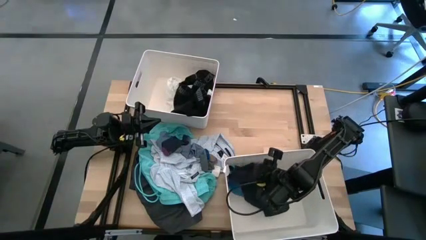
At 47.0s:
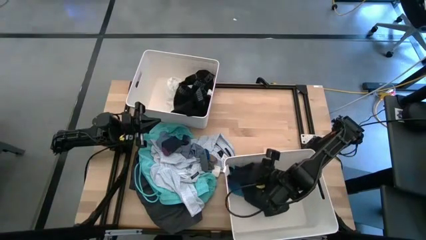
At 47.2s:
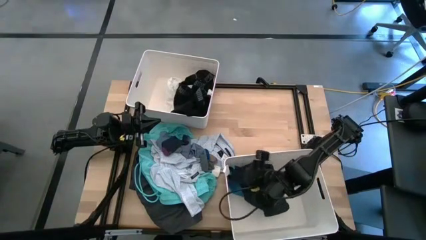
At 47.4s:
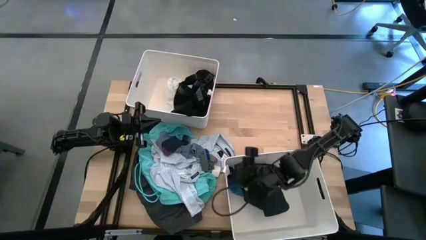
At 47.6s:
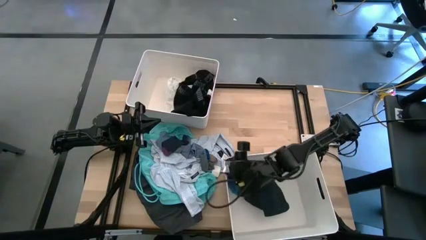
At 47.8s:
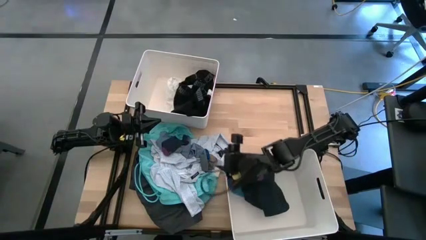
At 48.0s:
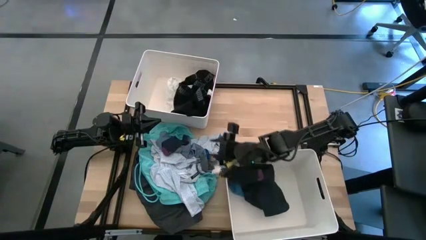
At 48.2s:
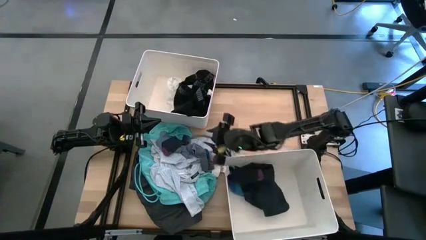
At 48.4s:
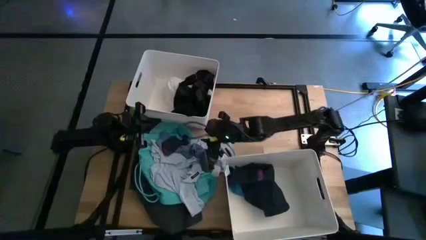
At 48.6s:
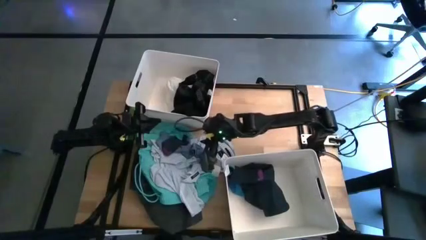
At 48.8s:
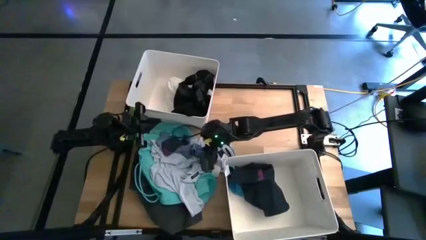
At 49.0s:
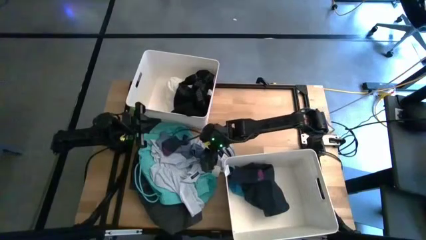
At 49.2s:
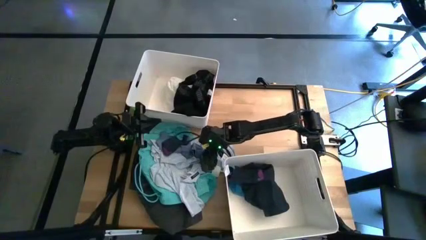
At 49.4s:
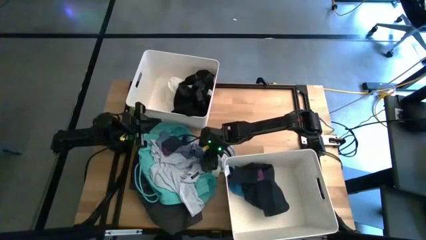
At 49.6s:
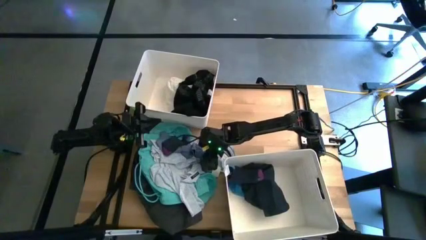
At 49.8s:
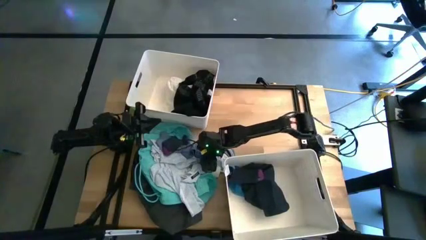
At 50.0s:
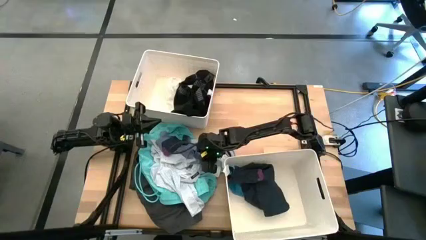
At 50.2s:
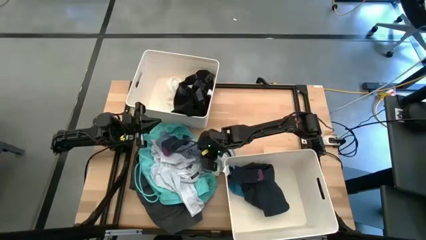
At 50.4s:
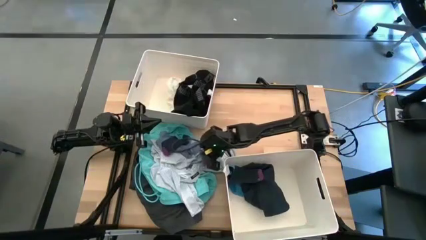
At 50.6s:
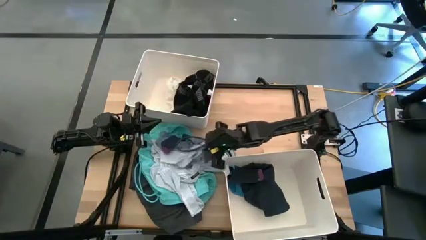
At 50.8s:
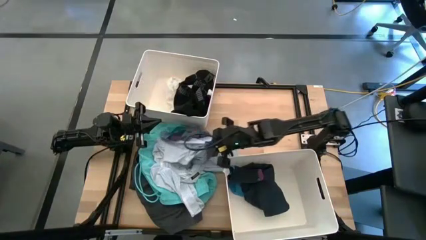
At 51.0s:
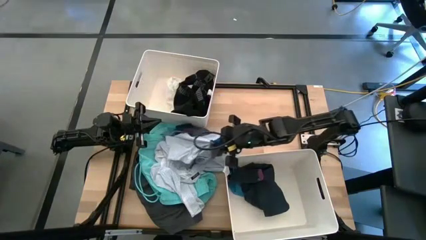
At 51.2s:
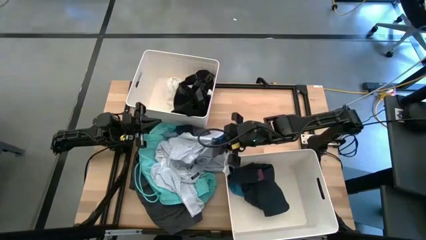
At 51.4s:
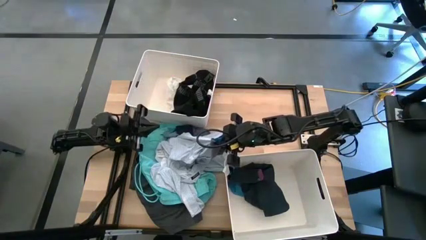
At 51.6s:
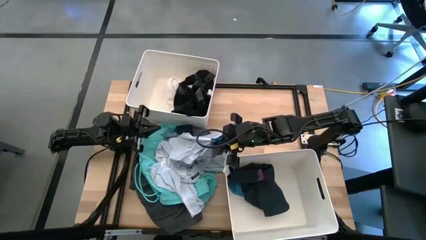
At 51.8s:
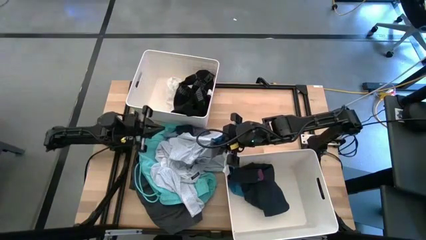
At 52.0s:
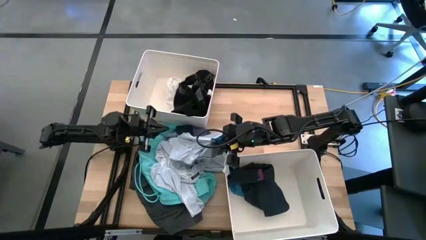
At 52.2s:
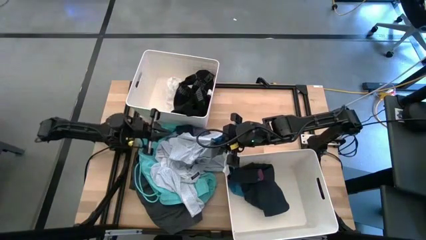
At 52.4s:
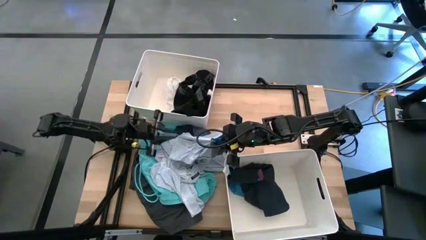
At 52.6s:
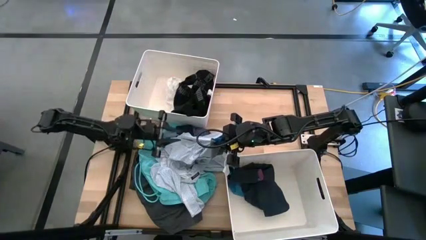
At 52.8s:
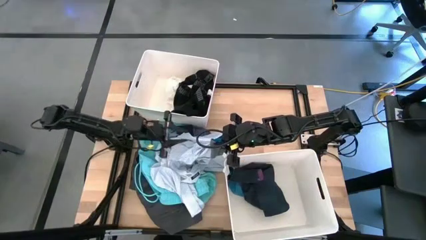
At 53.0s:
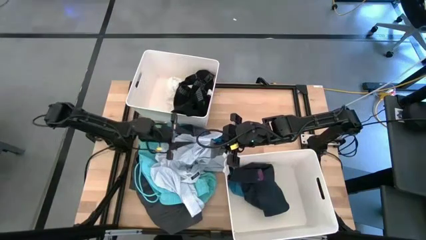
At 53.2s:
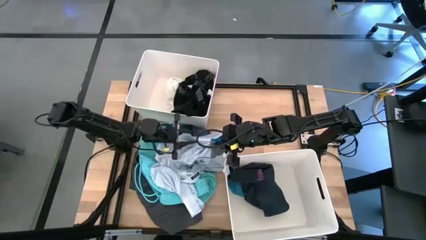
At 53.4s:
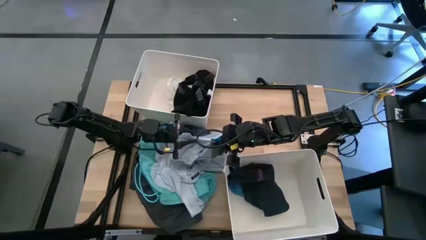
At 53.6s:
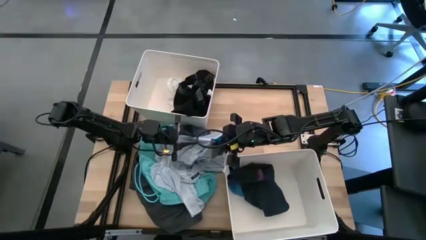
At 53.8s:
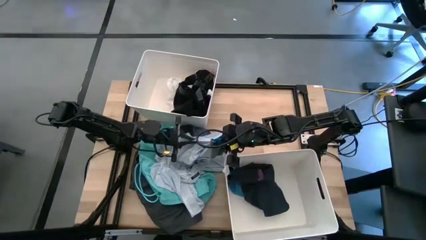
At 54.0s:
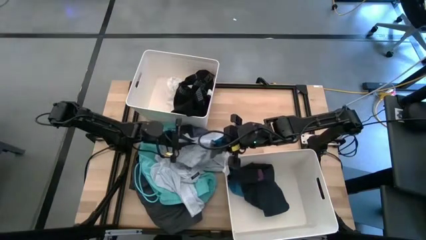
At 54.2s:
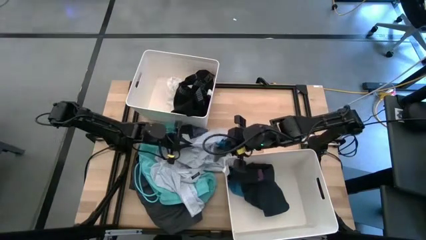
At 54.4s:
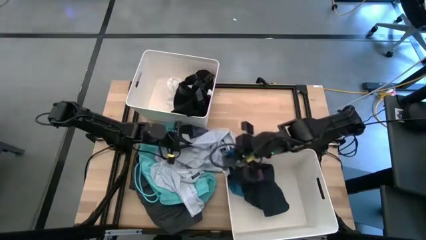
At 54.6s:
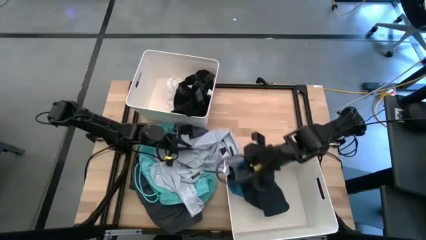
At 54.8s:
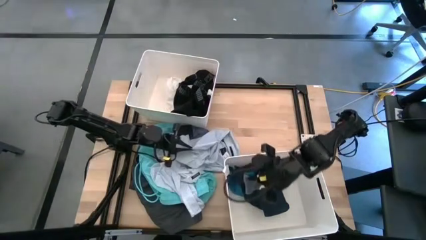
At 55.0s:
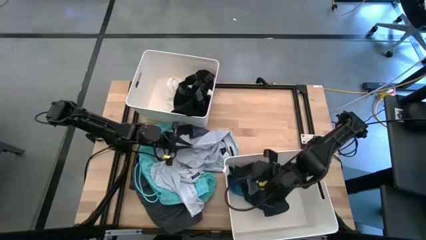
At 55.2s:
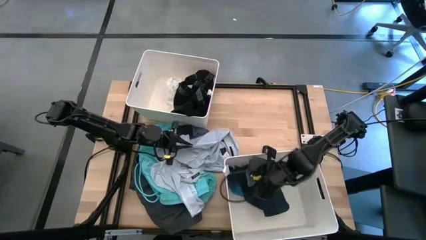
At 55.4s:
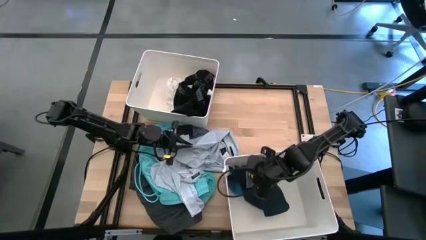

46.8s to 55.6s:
Task: Sort clothes
Put the gray blue sock into the bottom white bin

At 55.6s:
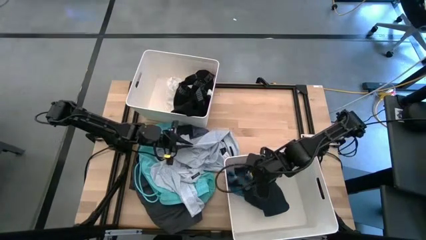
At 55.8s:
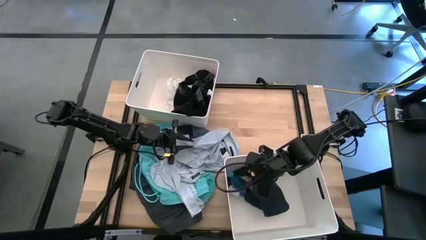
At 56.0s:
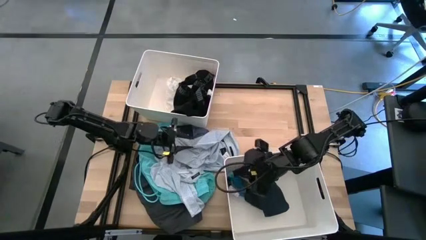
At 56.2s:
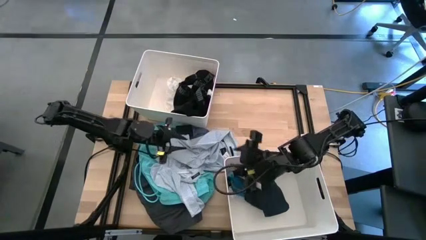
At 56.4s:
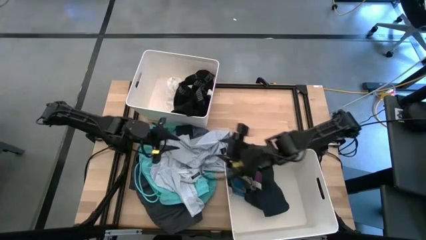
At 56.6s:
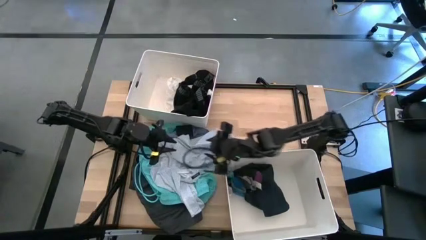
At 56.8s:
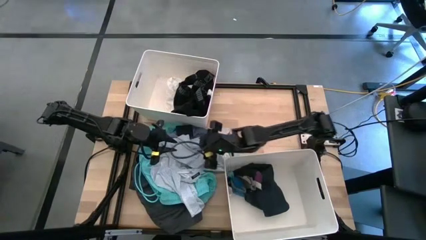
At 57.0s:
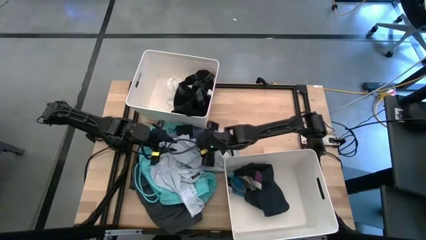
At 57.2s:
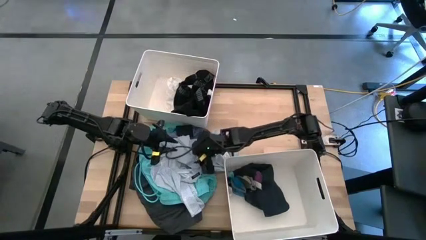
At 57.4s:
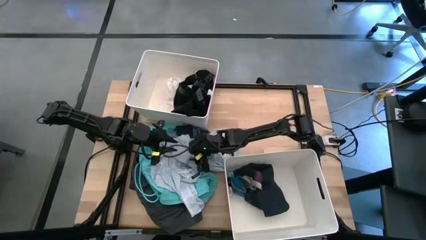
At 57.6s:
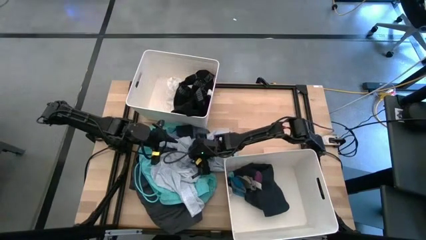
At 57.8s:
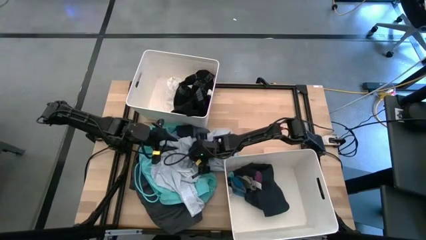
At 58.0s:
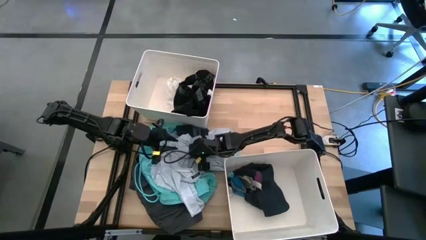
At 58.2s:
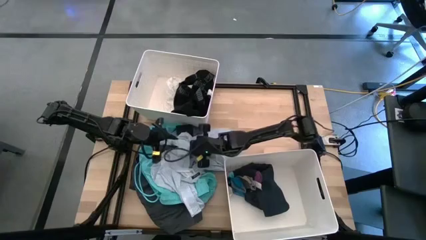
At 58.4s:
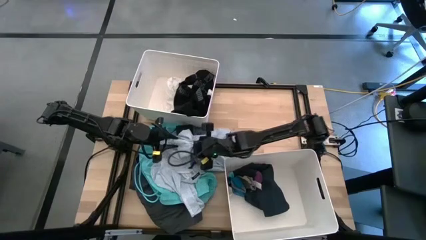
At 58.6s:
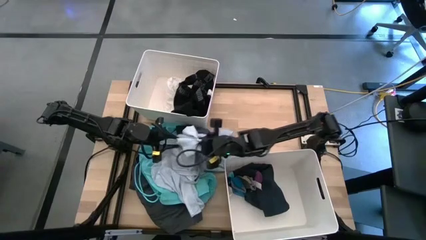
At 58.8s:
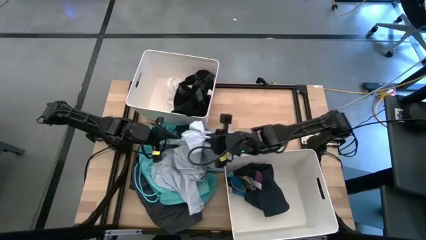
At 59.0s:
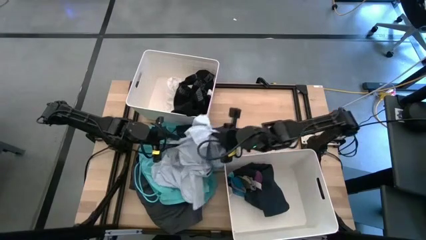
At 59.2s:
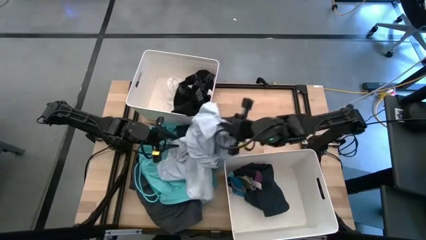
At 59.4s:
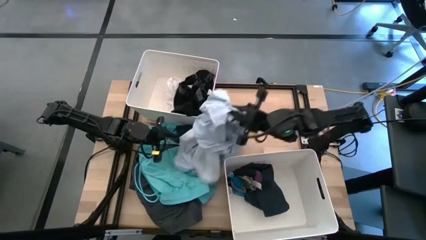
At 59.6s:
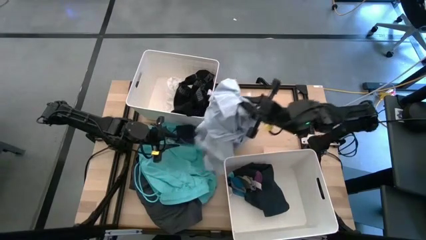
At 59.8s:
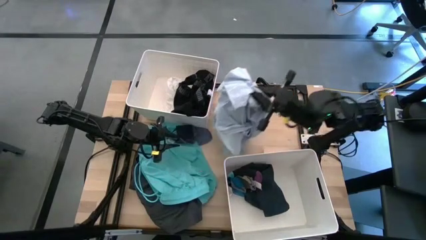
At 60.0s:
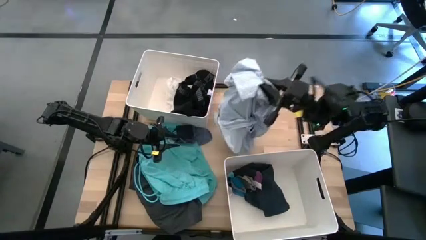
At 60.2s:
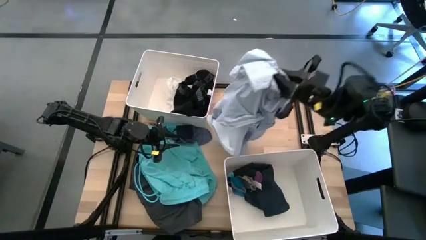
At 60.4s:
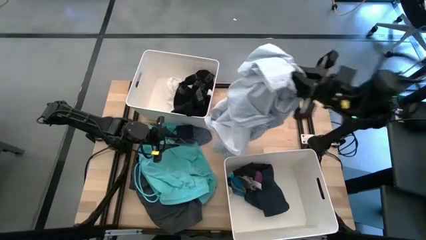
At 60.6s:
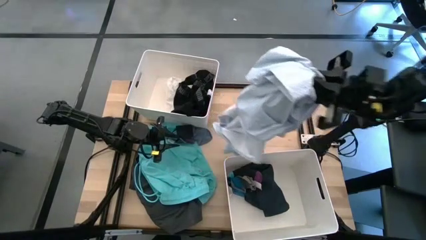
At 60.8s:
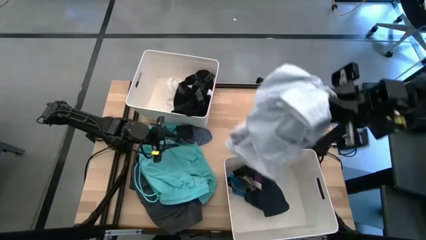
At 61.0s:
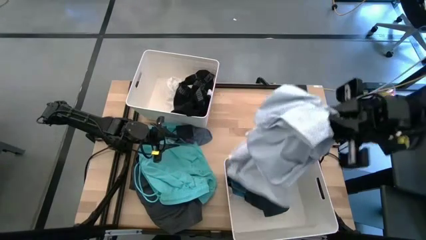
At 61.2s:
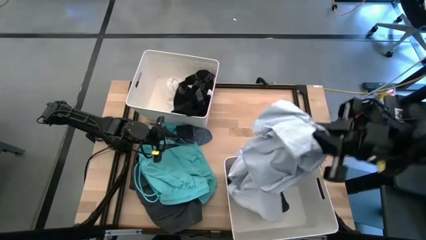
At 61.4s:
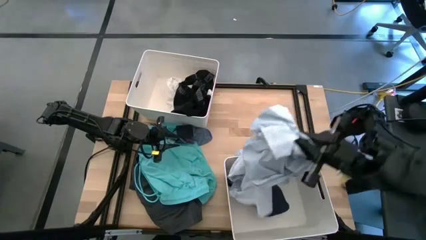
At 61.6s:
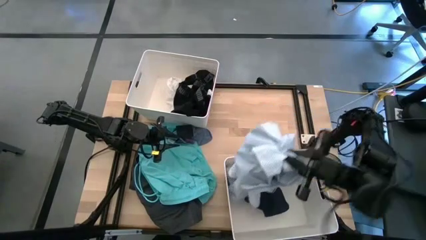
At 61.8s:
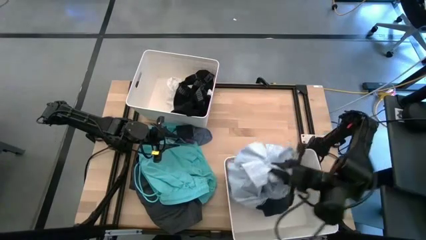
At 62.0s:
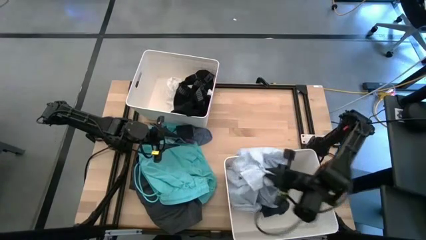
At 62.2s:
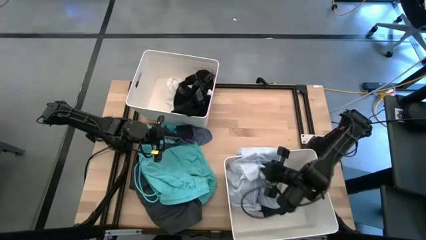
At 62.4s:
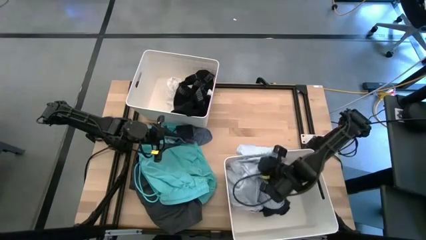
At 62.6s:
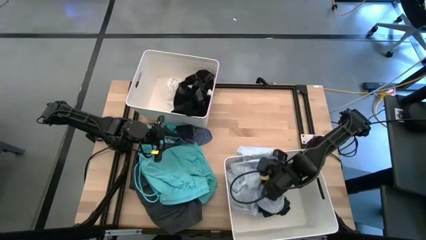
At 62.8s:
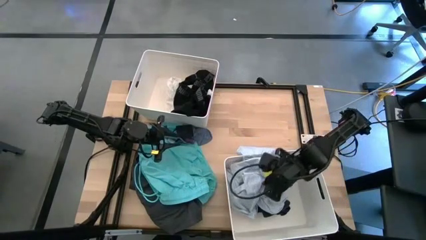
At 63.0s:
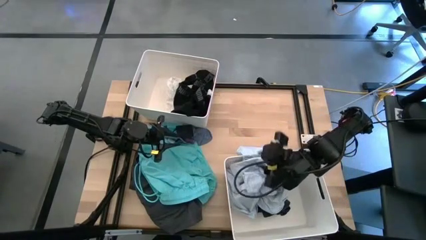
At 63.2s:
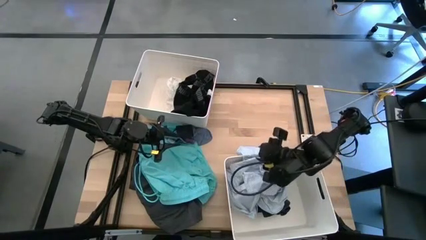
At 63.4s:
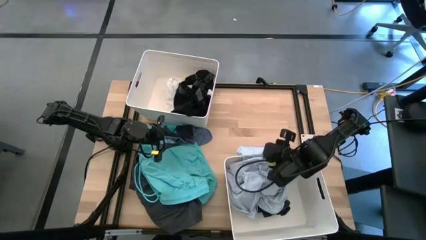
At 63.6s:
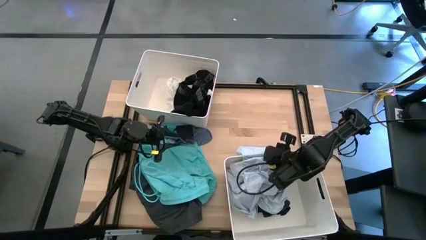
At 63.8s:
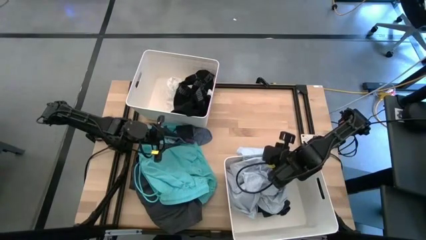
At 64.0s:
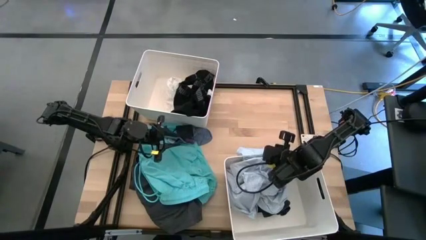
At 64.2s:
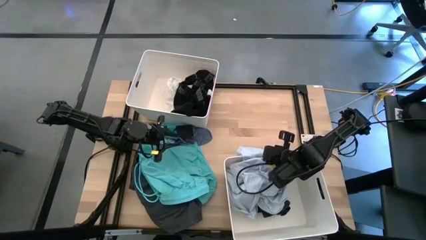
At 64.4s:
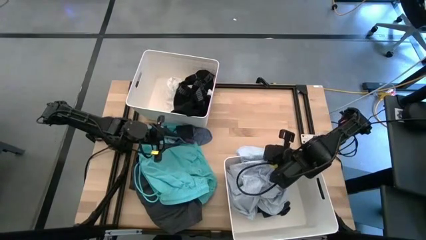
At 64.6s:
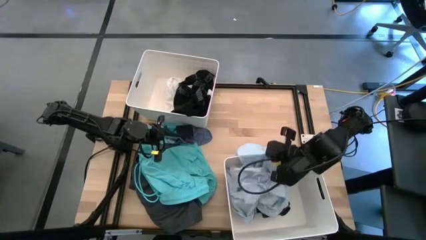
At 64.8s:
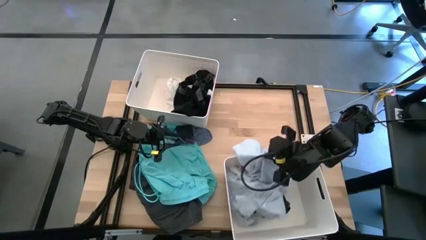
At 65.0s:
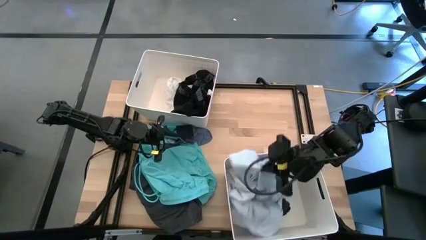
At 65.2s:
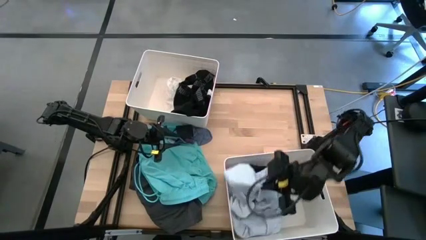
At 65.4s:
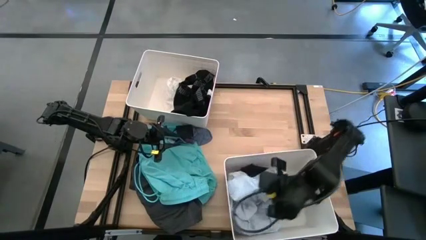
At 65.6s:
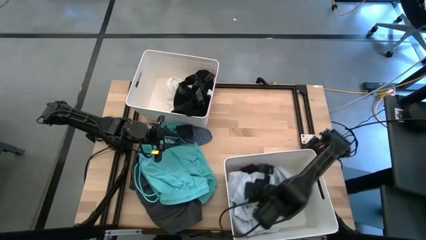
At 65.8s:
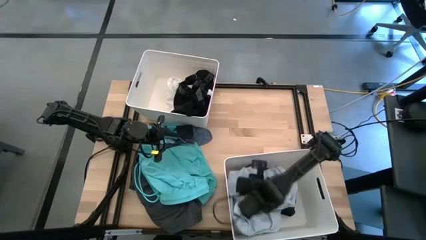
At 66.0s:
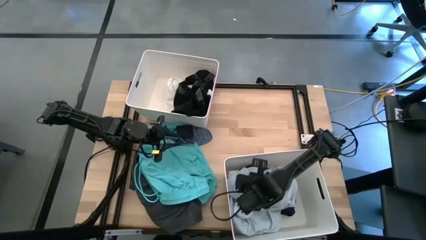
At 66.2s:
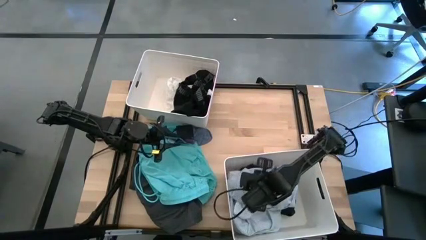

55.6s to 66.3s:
Put the gray piece of clothing into the bottom white bin
